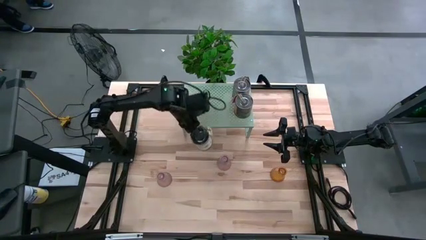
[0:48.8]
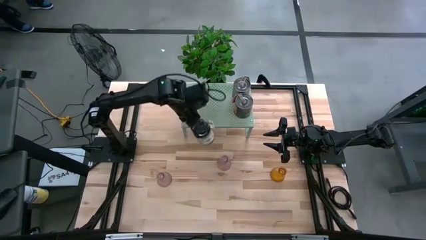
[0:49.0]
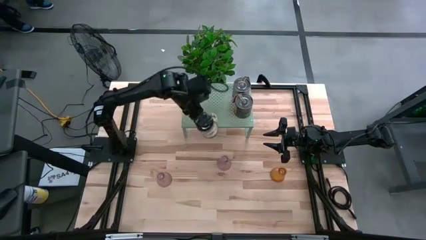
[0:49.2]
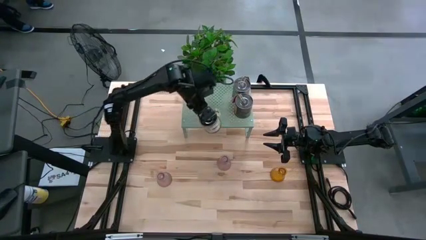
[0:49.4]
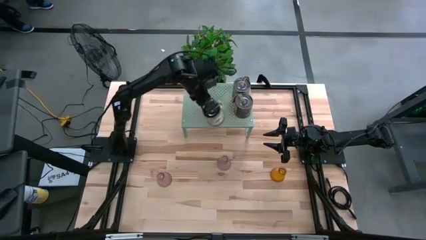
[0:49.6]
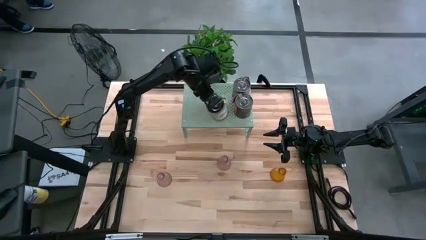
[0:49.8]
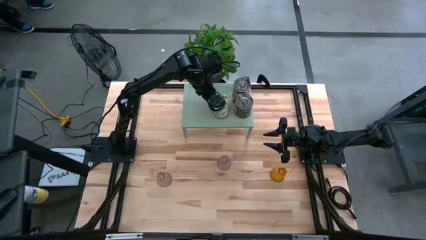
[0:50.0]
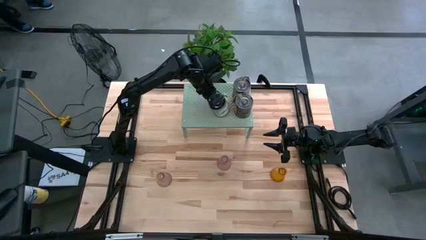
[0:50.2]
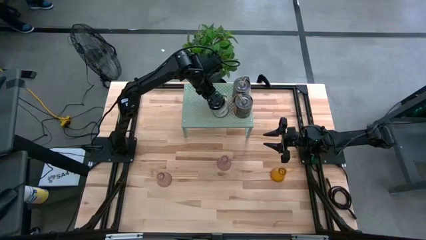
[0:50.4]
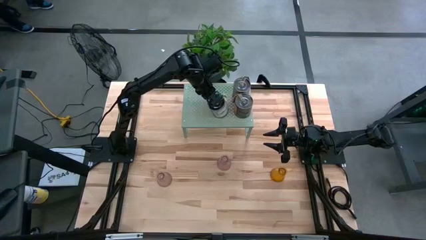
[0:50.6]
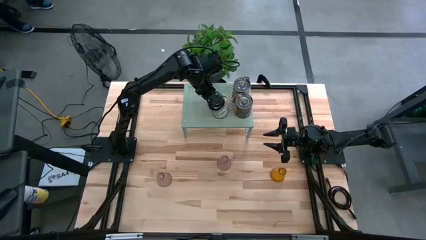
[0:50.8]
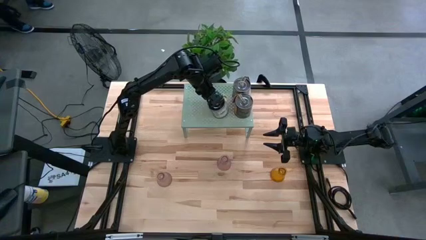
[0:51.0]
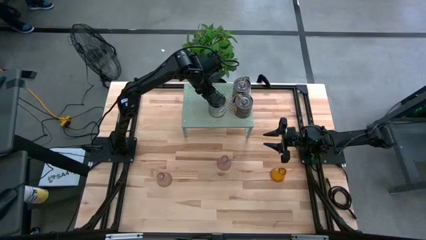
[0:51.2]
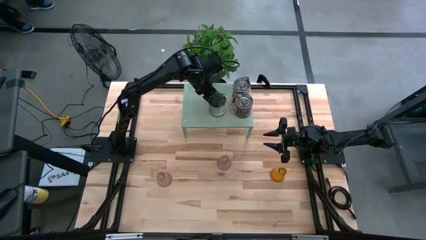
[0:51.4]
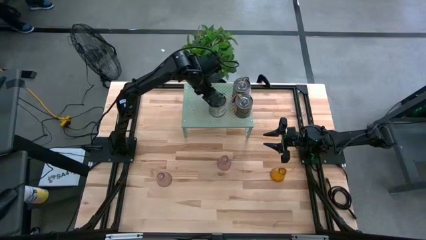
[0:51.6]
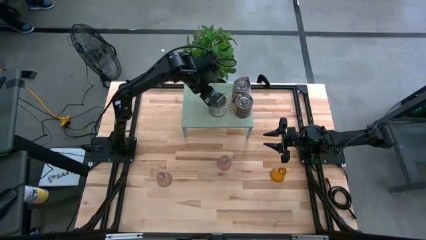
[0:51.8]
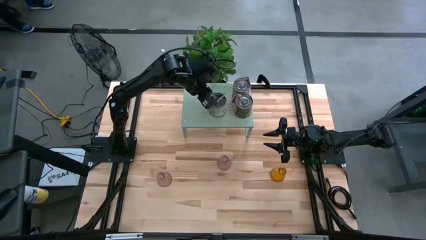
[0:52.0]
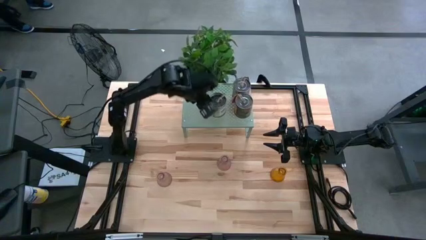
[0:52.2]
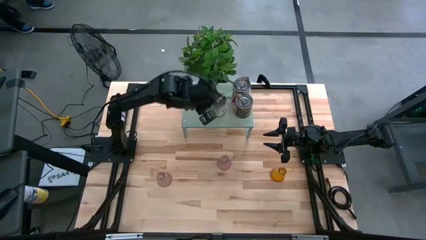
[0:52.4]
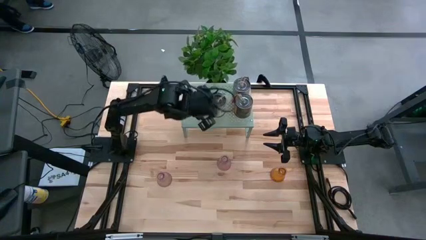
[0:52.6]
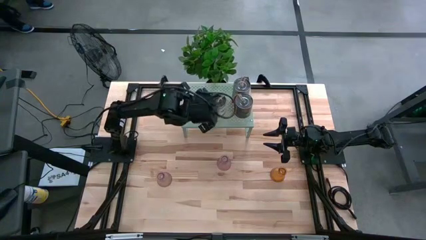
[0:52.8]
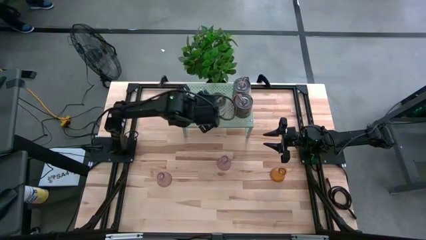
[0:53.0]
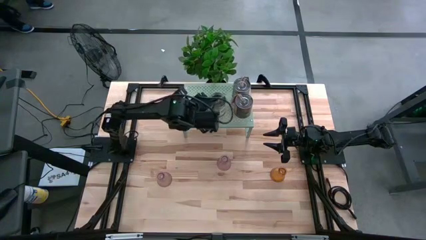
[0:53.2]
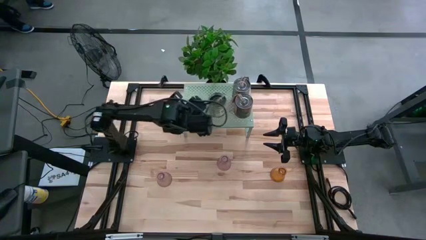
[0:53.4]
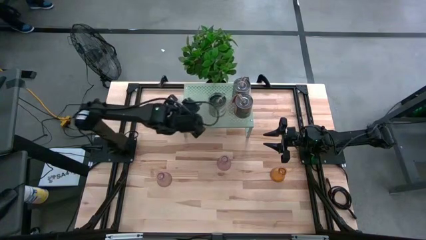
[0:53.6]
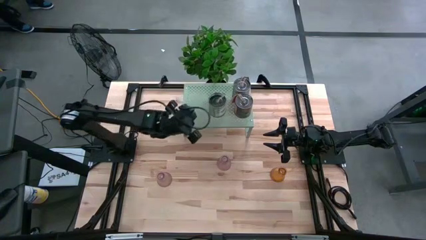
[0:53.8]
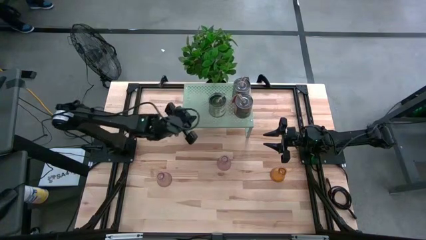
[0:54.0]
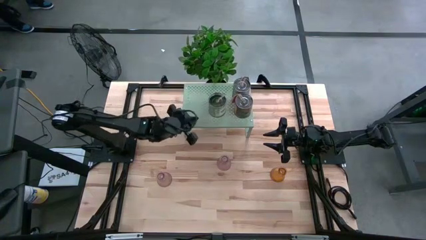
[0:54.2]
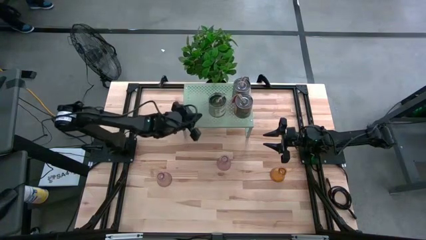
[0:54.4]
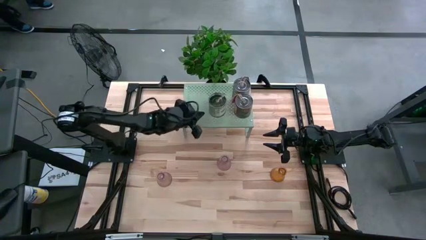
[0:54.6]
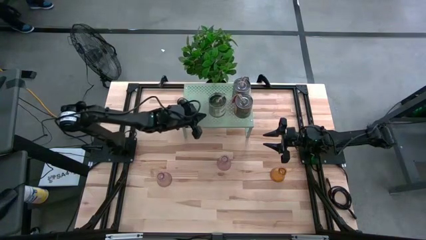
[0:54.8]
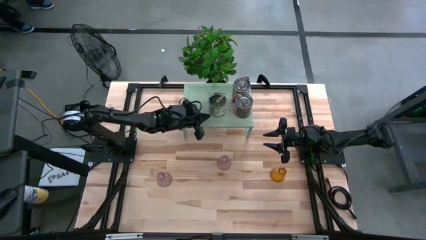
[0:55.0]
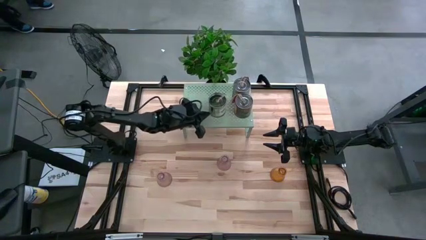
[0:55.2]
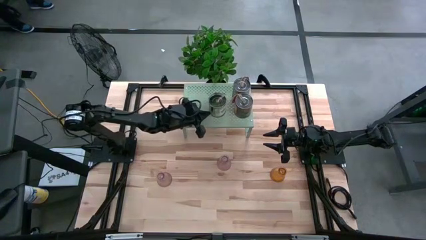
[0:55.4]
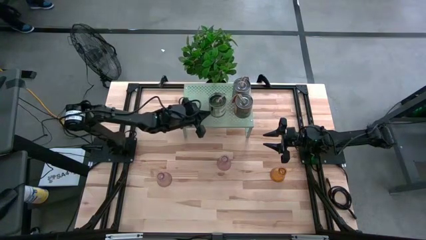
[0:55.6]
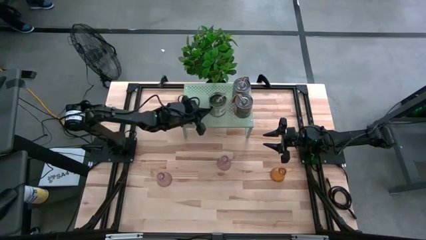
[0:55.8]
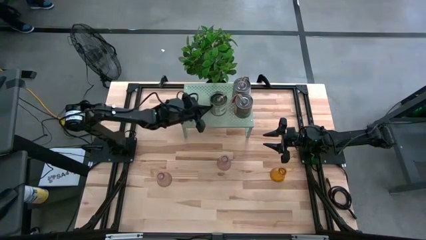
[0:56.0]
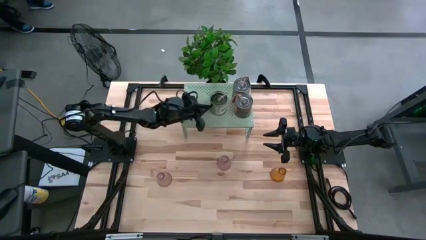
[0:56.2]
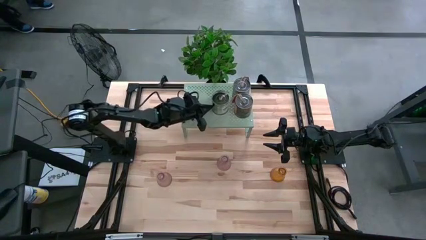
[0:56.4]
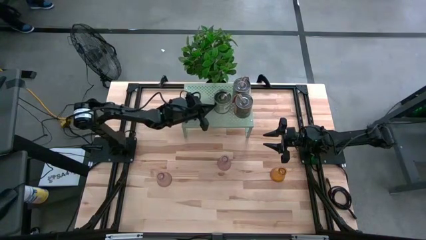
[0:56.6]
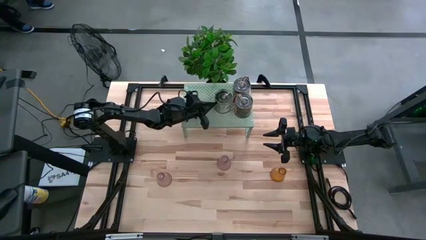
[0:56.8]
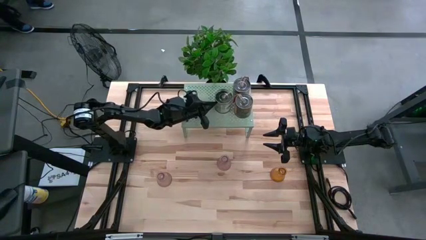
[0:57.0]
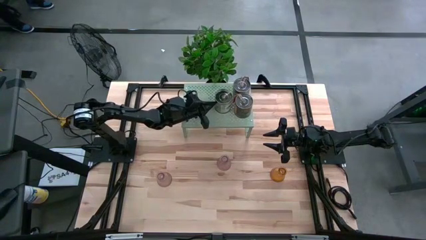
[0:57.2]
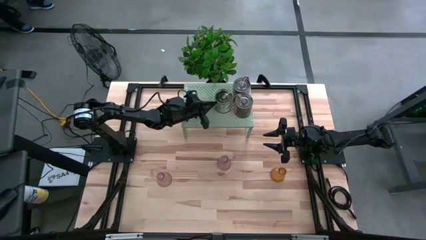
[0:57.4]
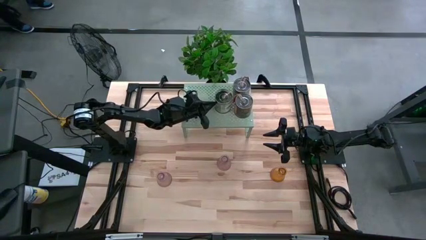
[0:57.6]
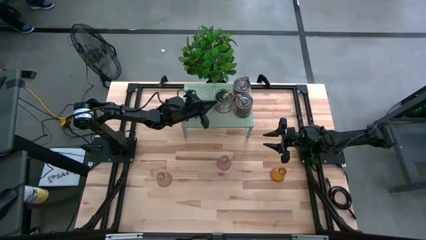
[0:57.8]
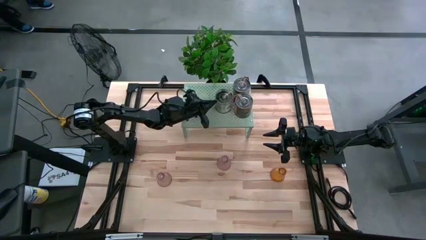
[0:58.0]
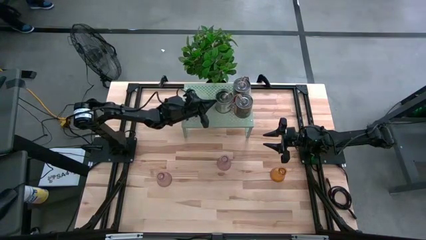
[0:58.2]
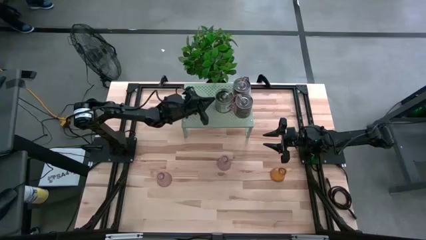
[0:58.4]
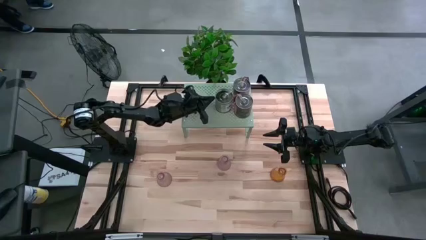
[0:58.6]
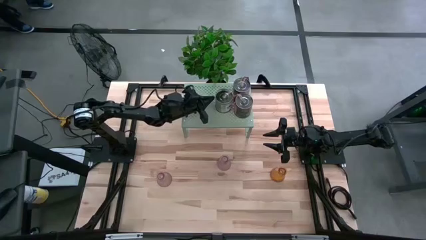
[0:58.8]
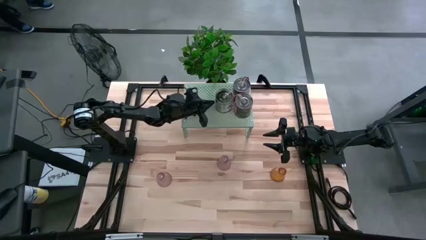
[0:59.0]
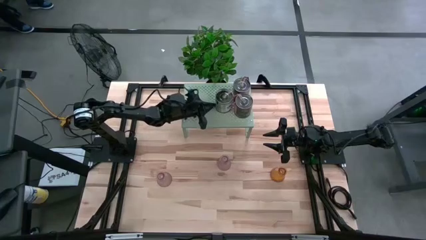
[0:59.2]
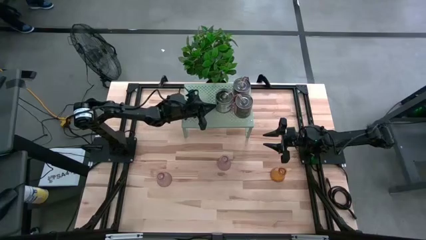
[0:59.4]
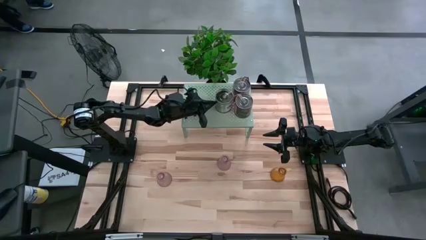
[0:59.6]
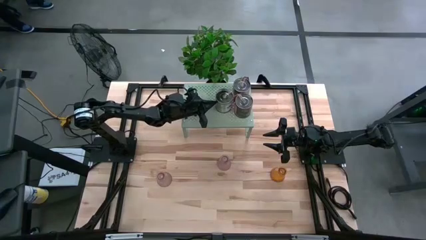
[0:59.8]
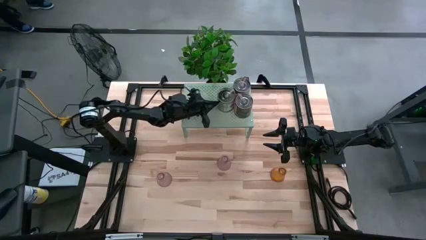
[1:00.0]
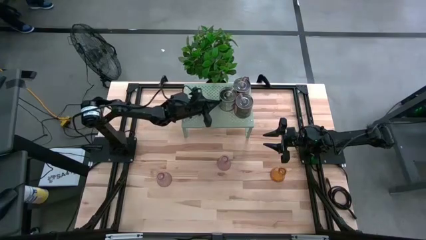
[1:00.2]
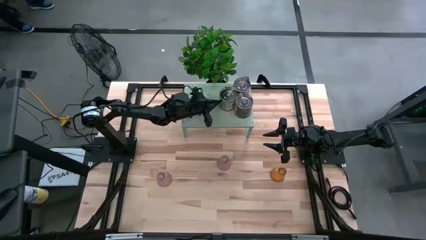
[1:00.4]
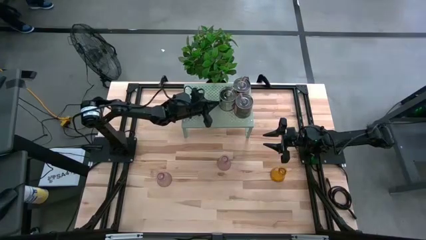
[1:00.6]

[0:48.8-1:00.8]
Task: Pick & Place candle stick holders
Put the scented candle on the shelf

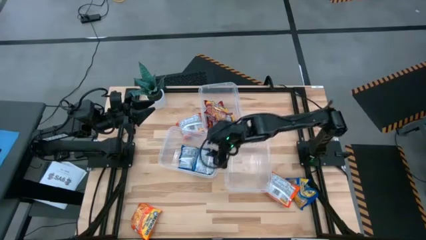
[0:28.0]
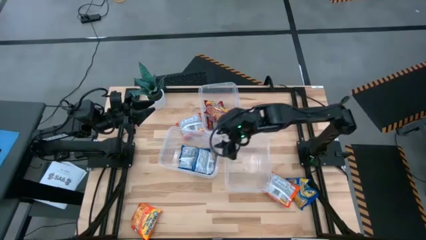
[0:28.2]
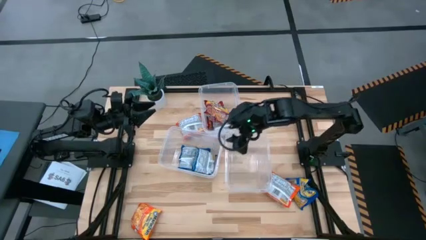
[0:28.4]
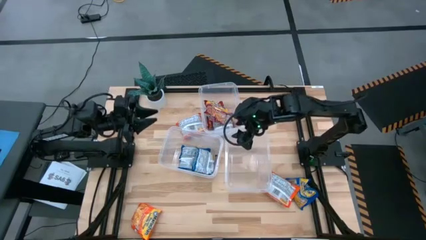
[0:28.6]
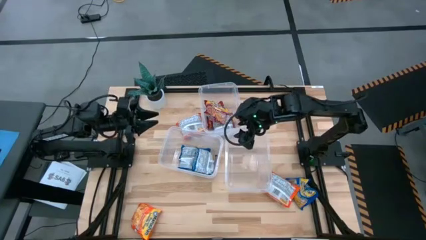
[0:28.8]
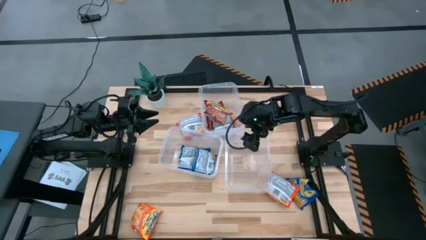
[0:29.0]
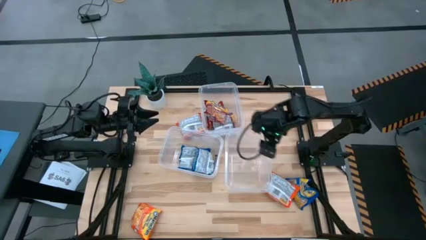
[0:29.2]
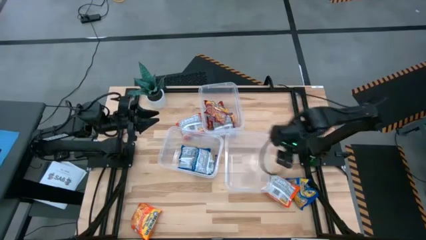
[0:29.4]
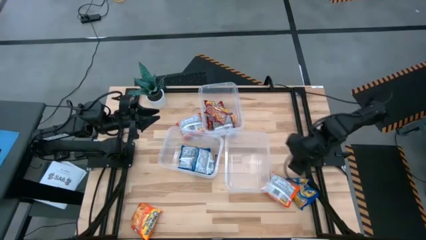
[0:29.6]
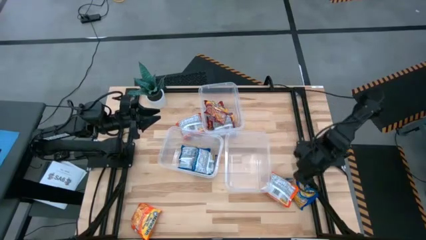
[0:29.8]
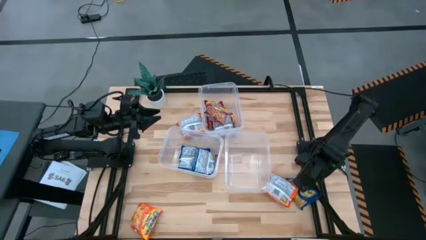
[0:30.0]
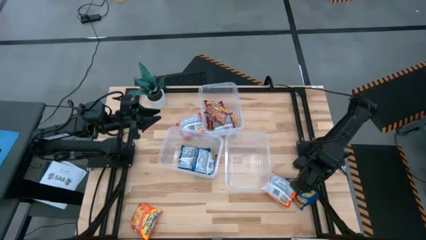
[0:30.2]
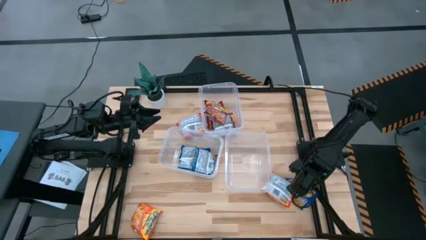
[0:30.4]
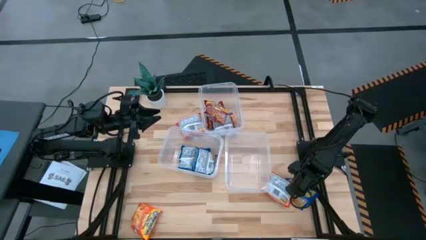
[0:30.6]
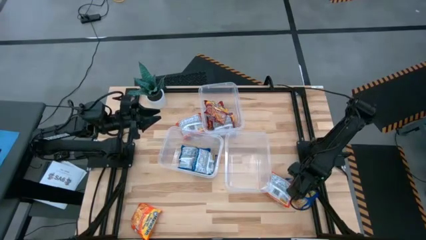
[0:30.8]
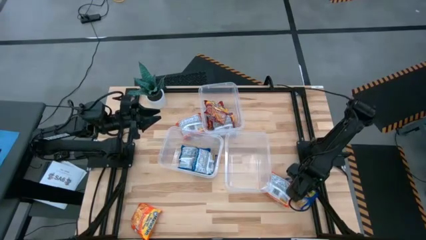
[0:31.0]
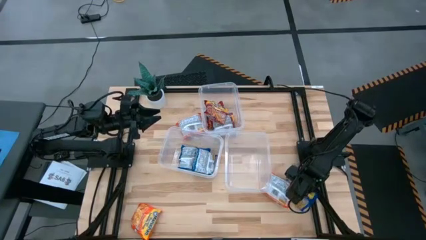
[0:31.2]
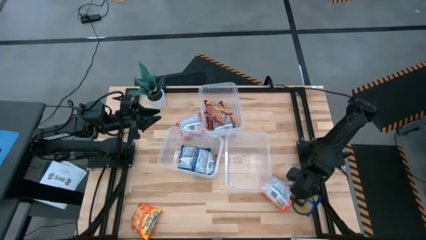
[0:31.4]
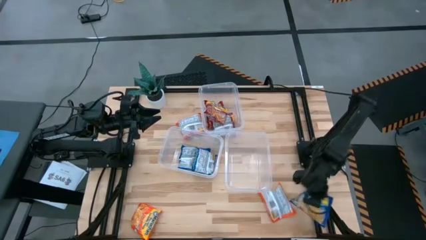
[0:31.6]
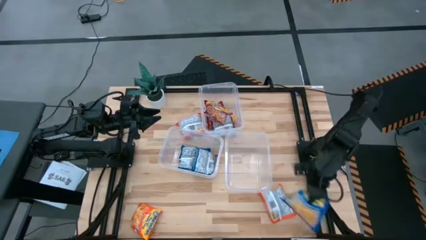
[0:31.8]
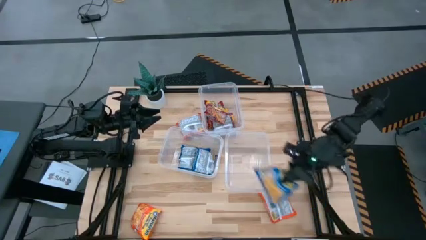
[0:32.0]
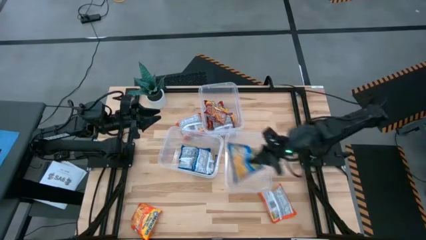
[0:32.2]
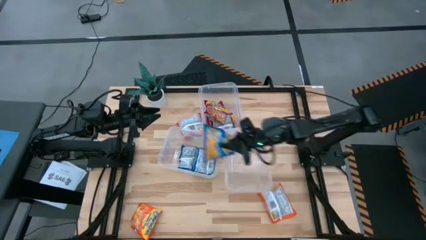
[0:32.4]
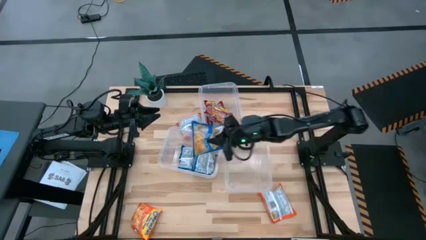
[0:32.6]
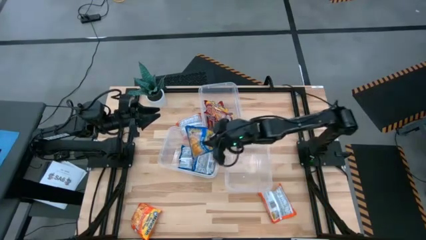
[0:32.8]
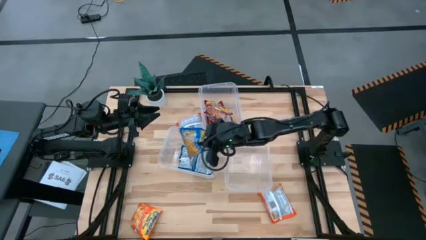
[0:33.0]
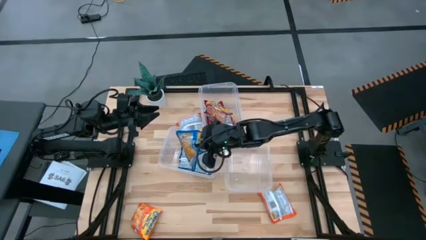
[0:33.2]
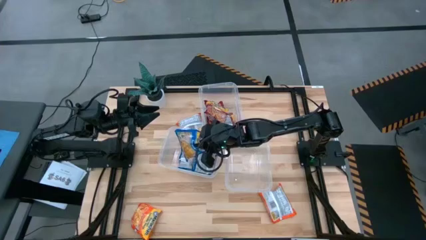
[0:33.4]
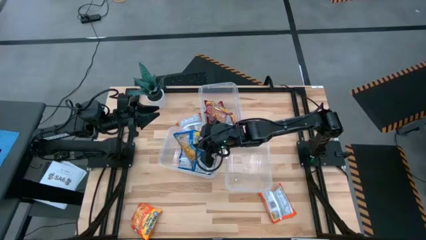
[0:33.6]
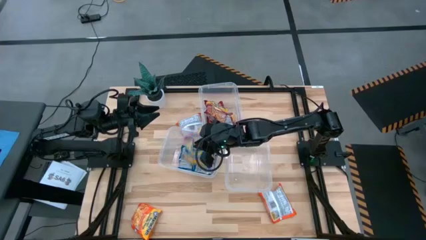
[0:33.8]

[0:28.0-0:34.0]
Task: Sort Maruchan noodles
Put the blue noodle pack into the bottom left transparent bin
